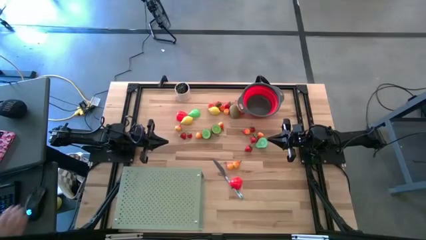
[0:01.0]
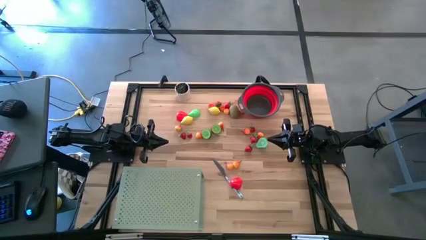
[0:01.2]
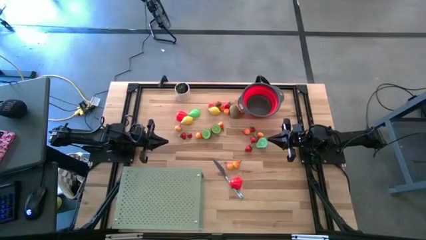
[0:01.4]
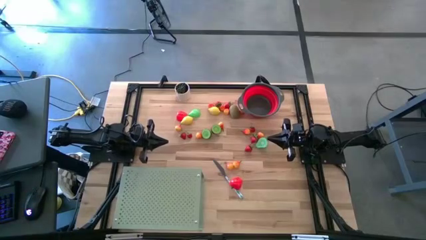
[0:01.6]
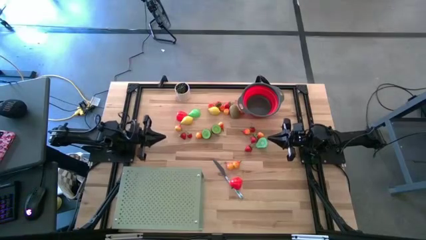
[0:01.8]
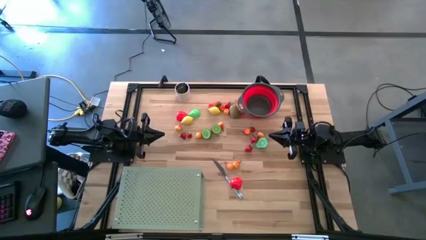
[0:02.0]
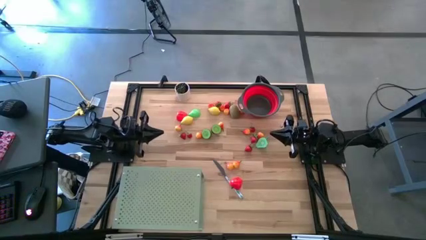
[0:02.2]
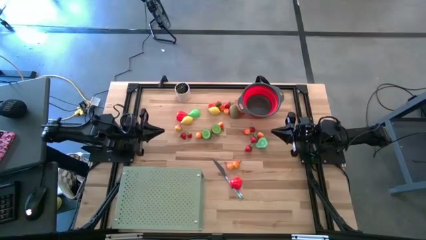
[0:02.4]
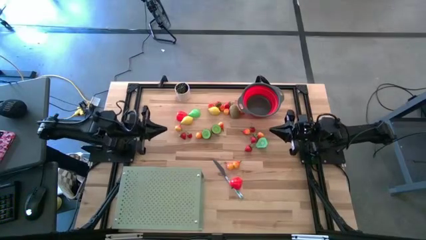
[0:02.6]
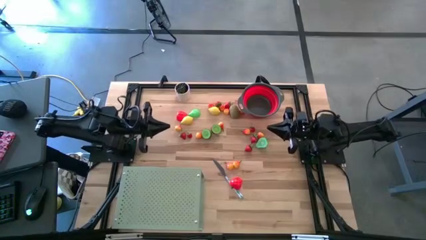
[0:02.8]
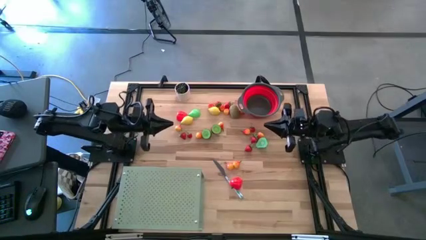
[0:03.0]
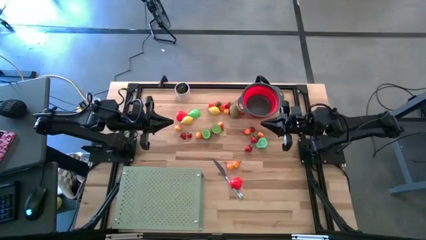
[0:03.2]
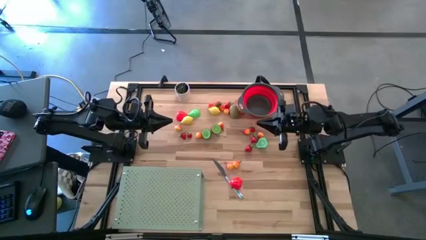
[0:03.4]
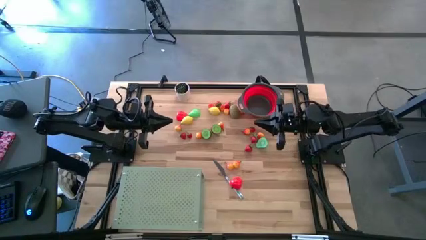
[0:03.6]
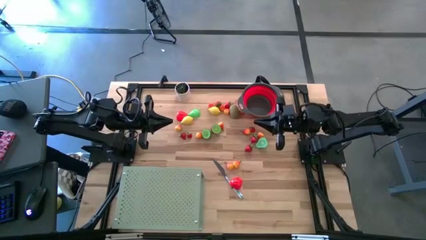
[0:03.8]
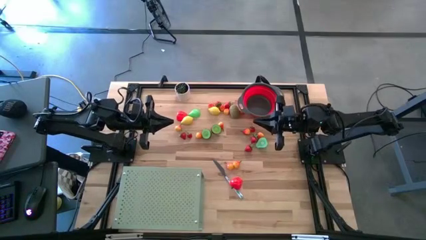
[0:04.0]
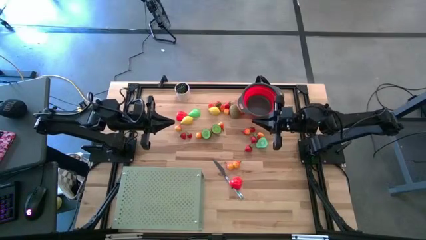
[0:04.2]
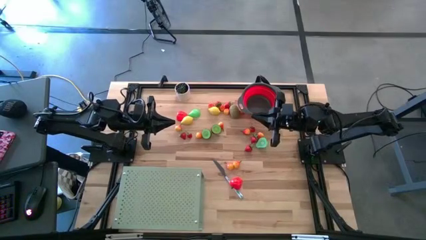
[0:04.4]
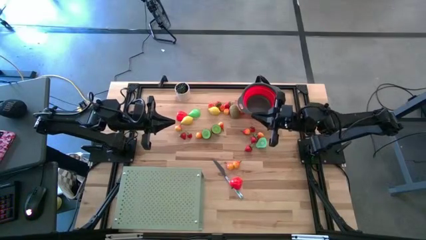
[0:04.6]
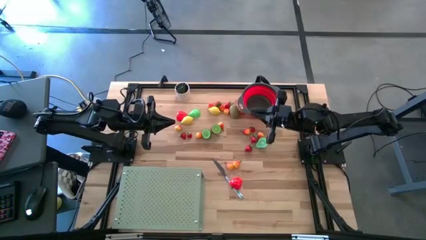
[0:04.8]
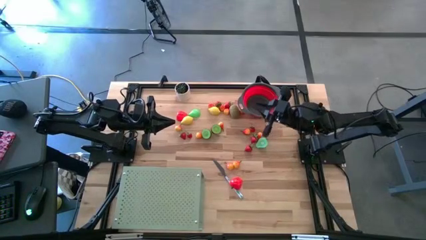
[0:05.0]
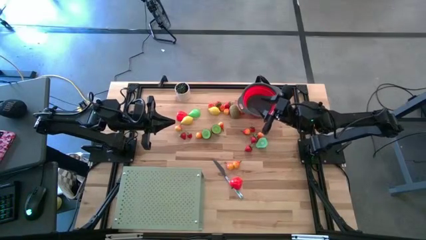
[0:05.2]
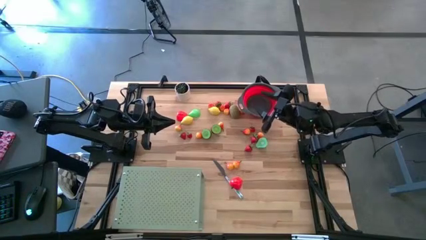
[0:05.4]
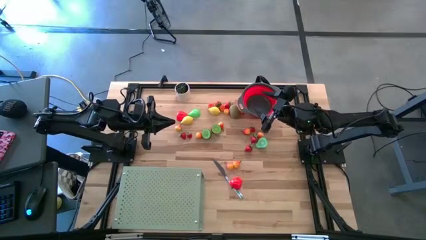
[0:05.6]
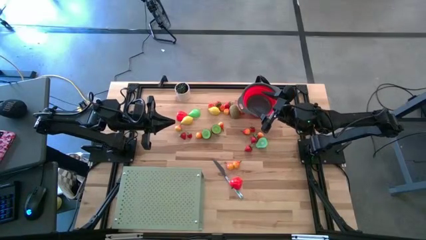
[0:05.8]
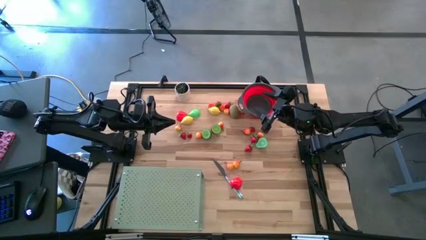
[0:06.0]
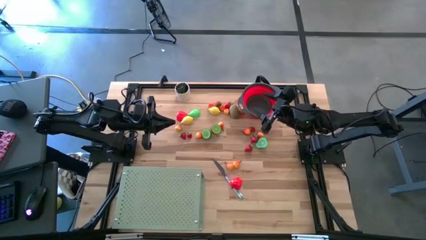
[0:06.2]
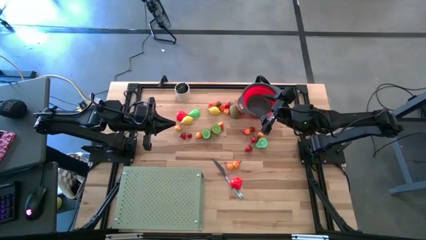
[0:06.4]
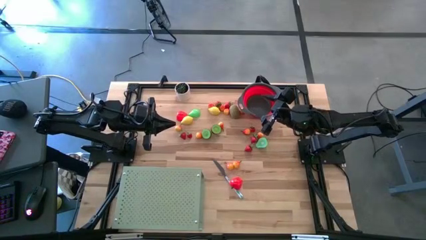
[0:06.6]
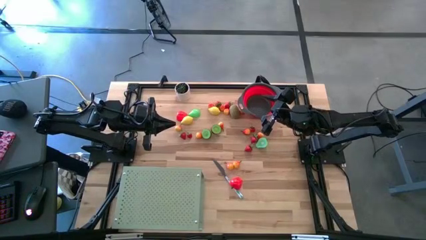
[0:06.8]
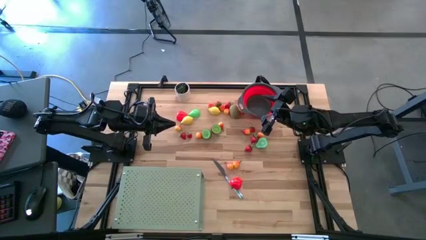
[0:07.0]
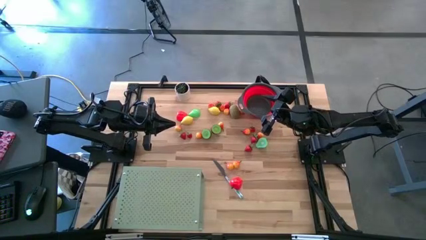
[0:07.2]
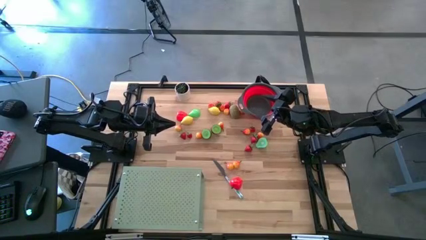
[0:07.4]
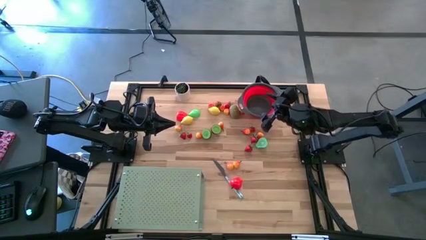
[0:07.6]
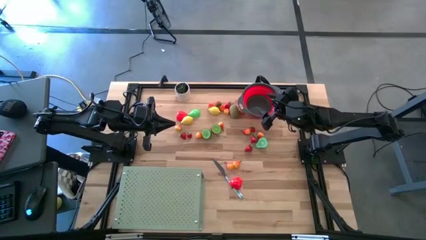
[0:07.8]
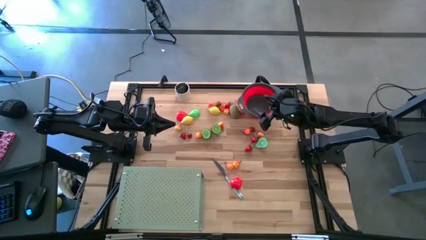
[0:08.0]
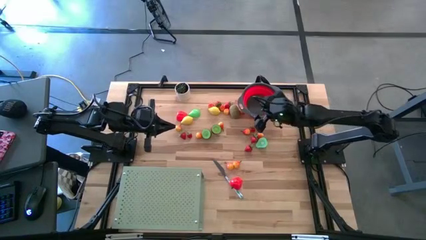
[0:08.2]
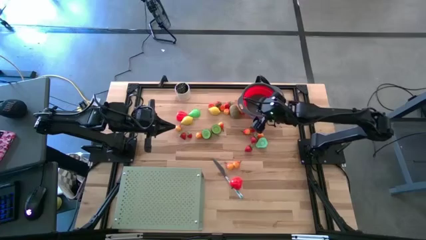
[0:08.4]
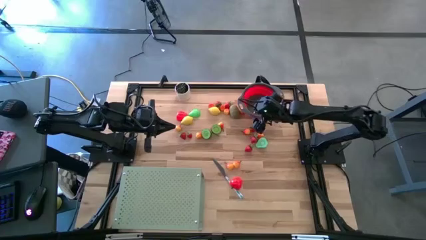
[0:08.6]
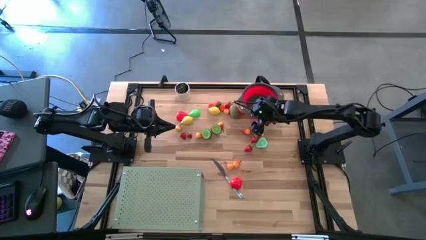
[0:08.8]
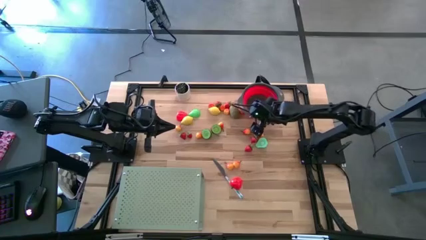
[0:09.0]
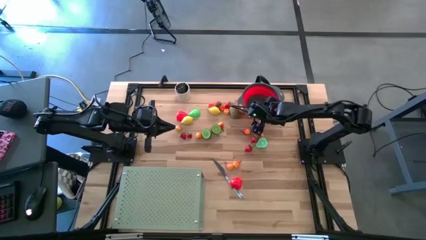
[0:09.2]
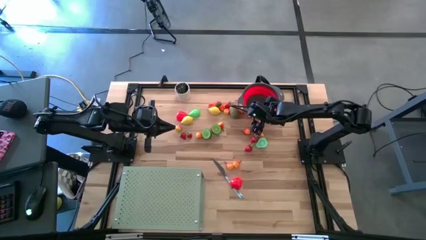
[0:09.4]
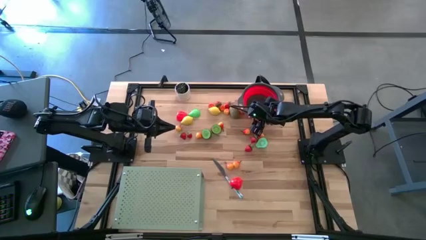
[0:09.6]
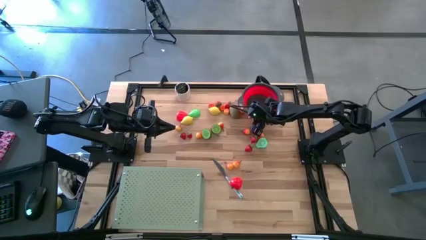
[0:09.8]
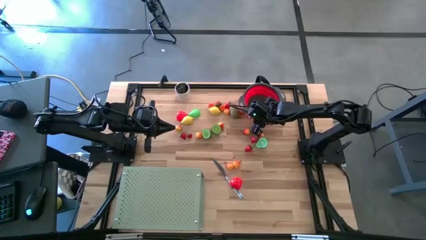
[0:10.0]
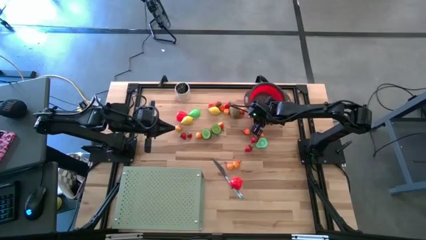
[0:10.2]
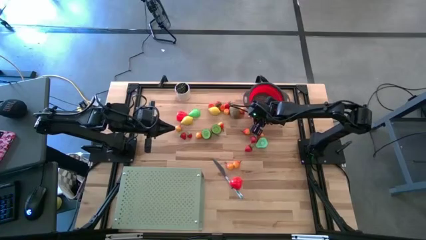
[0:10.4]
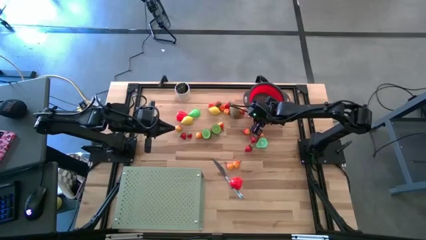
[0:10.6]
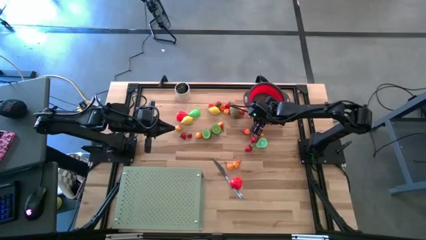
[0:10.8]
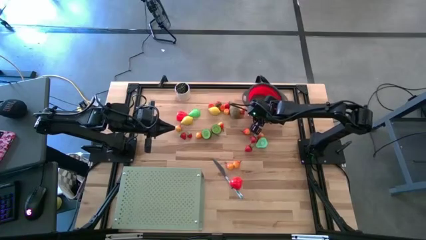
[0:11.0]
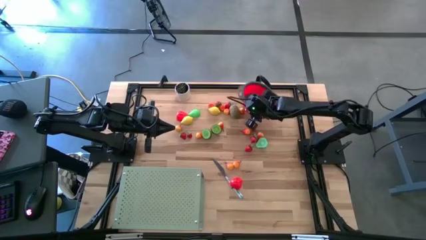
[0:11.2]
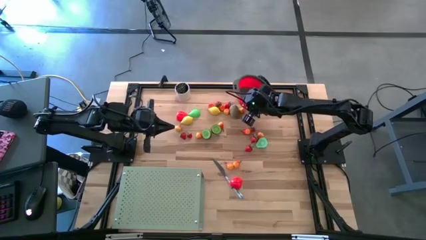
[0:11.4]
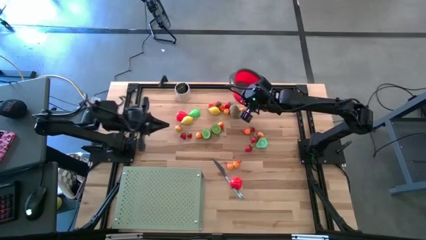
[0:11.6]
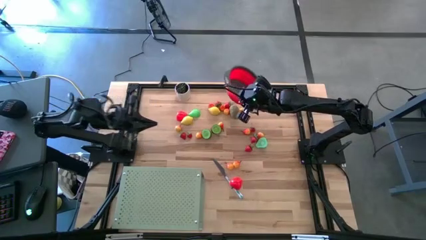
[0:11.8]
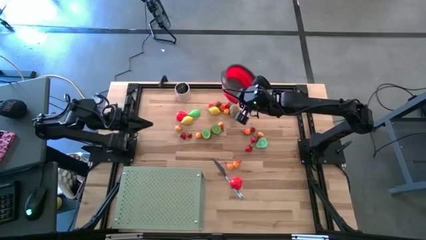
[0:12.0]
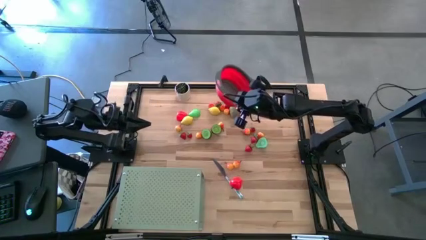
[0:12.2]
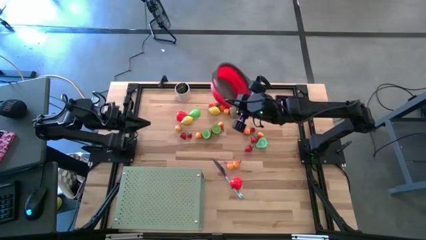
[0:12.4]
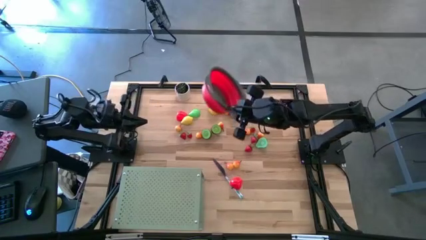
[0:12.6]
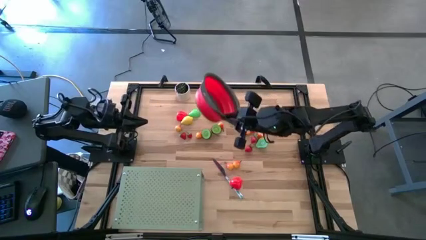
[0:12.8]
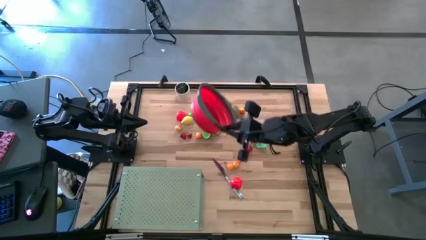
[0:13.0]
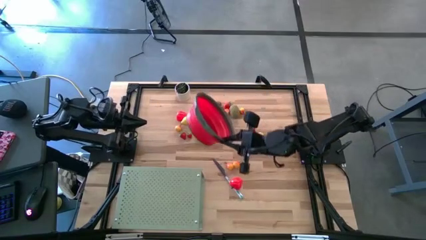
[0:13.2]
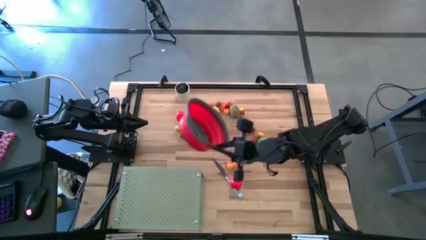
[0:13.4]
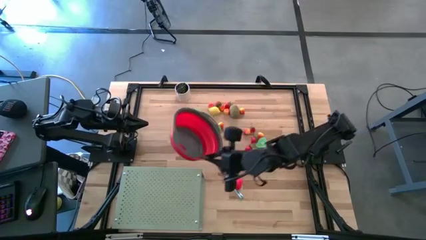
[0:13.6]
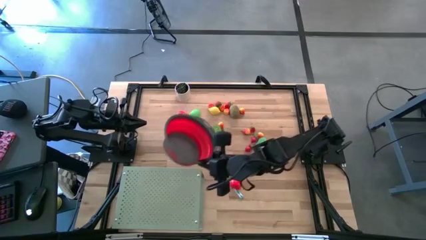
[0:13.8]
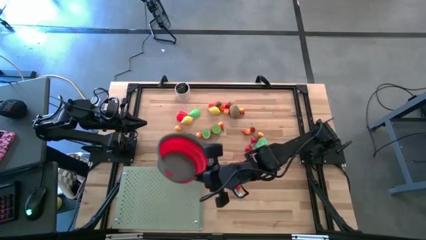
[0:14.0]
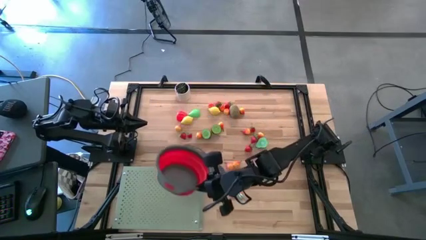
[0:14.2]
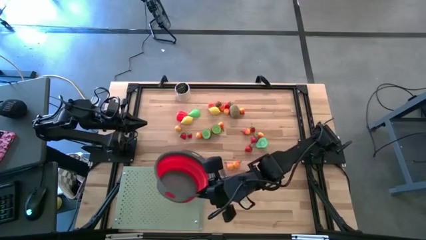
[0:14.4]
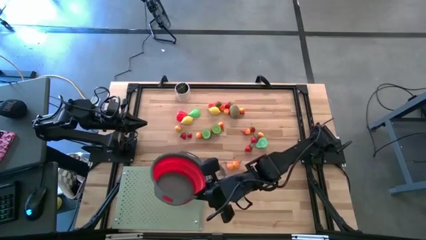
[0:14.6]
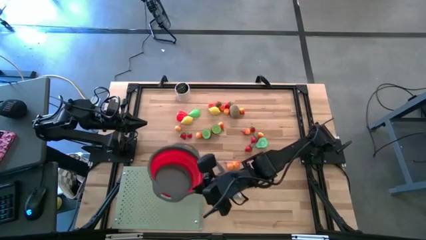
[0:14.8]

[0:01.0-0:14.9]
Task: Pick & Place Fruit
Put the red strainer bowl on the shelf
